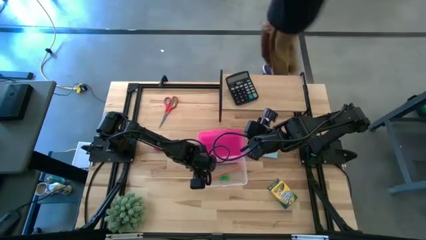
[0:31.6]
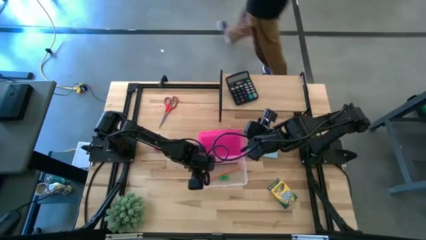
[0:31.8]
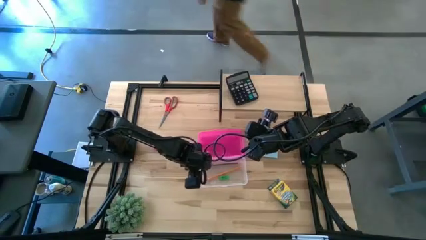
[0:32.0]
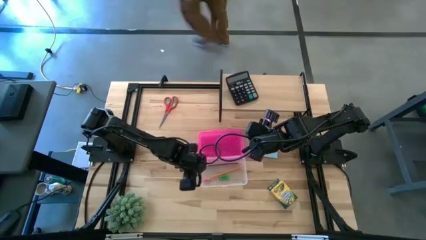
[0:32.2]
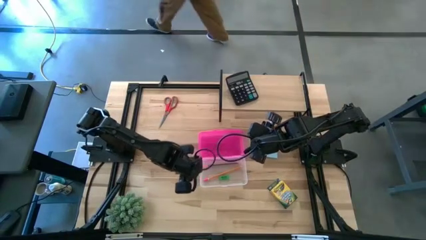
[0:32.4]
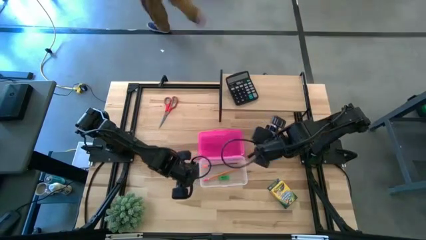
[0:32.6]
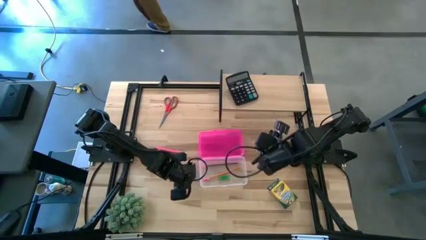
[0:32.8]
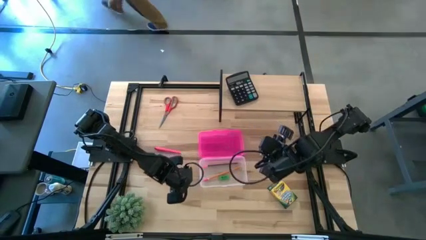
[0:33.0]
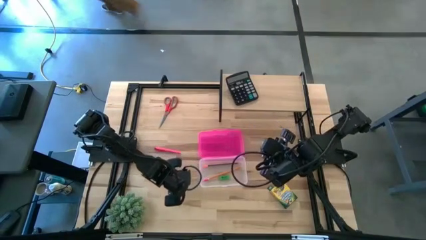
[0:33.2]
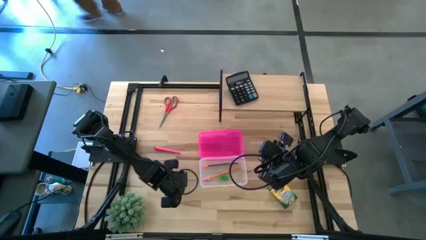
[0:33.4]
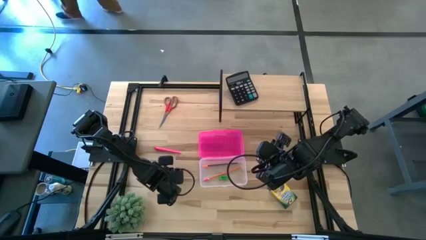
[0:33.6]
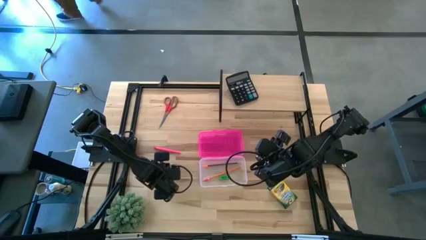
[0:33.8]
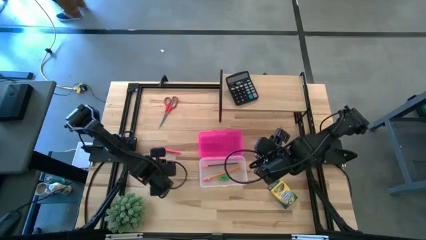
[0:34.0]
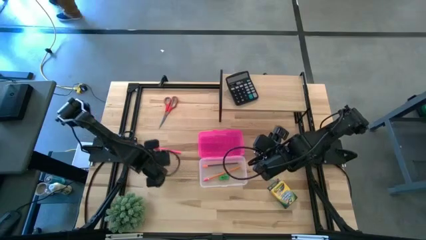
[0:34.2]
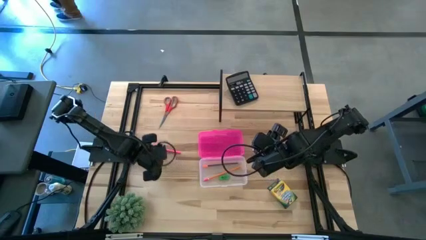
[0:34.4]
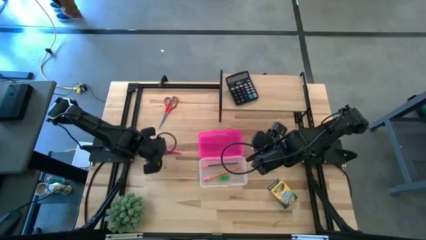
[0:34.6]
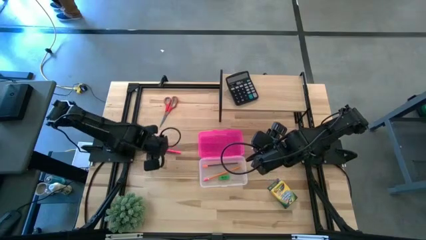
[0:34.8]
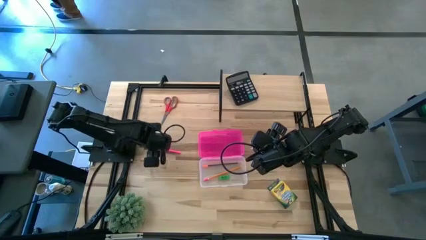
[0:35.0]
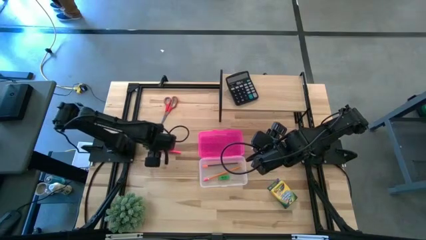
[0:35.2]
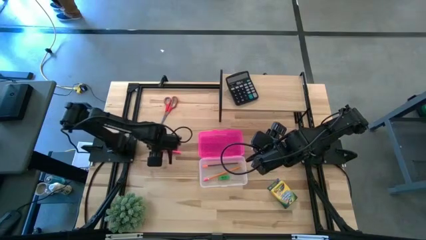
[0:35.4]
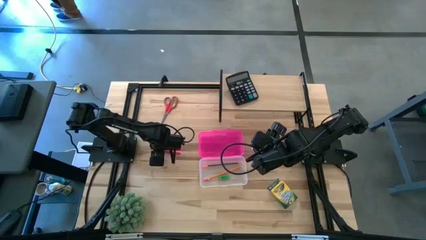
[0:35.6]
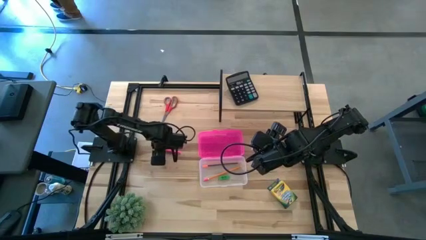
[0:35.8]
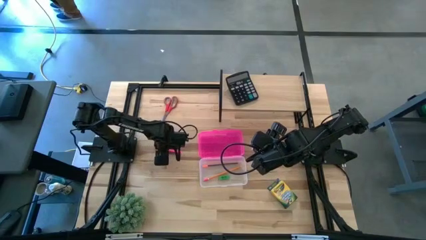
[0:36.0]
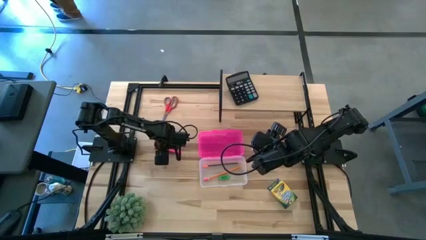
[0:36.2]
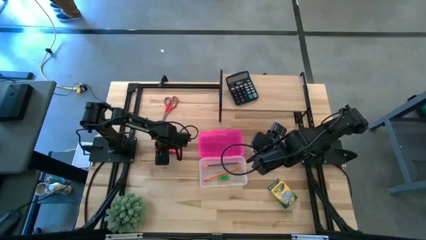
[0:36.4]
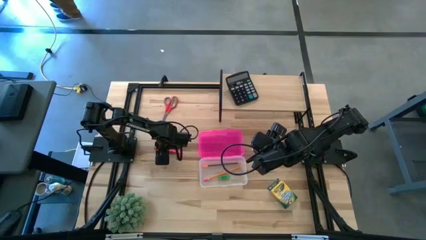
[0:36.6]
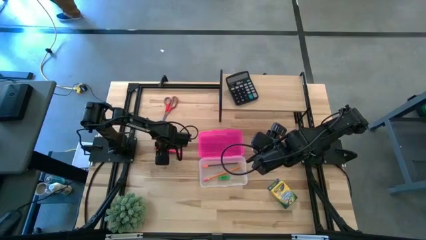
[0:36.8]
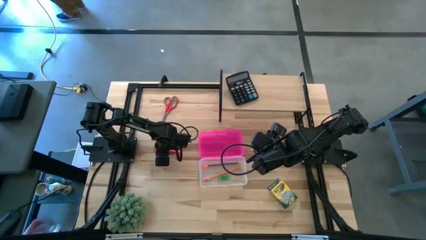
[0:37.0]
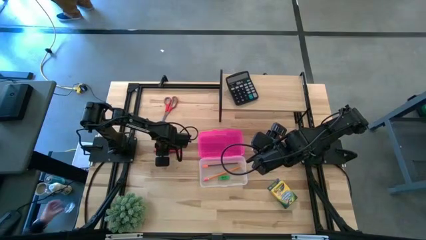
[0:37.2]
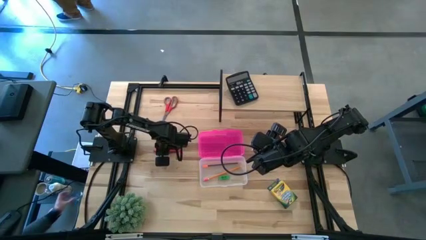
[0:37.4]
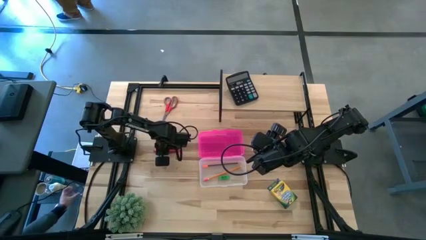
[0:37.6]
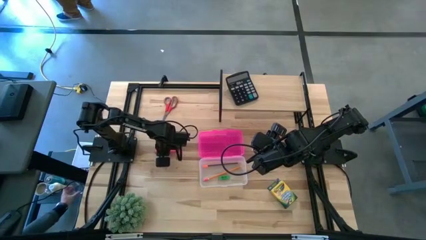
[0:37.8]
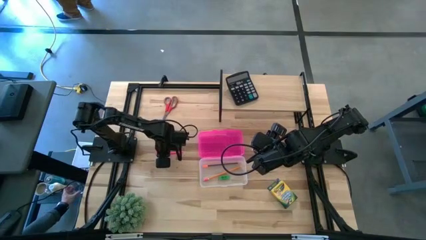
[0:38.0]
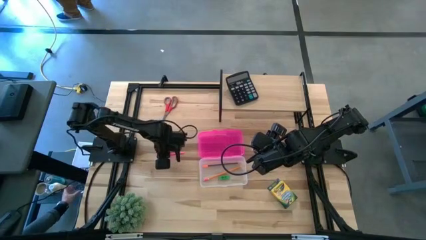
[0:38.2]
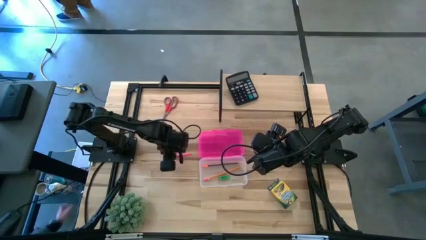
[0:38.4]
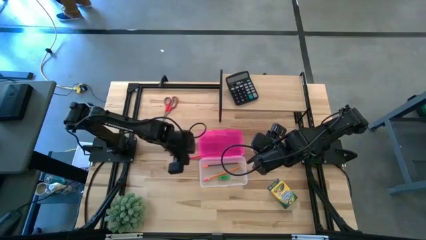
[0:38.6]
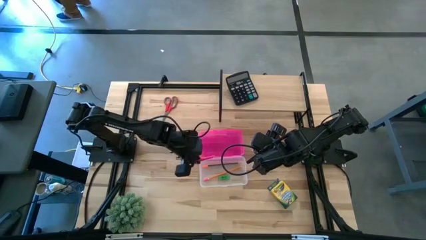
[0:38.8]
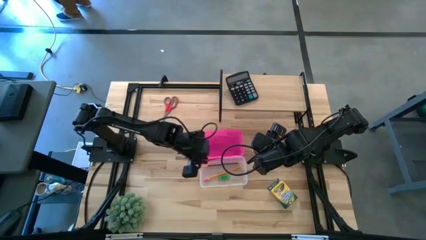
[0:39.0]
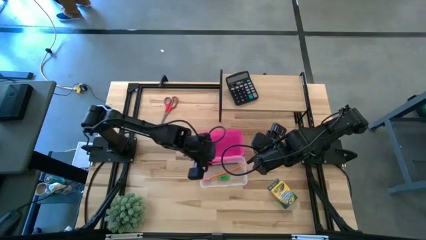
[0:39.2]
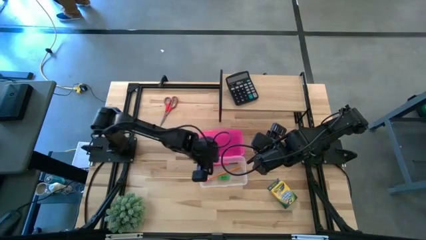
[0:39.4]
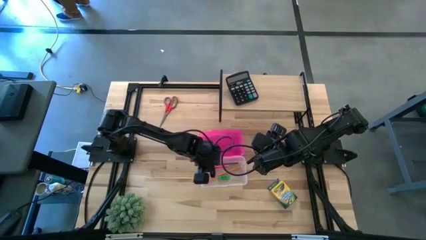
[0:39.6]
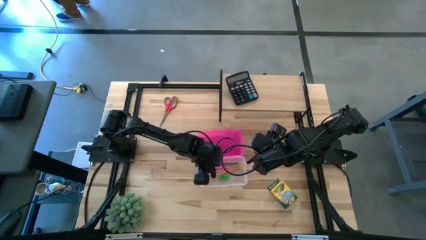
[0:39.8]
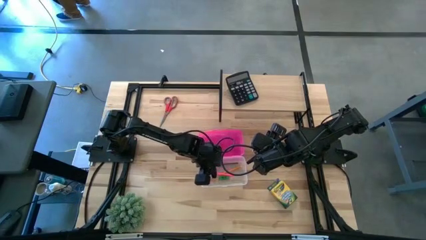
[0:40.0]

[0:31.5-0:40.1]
Task: Pack school essentials
Put the pink pen into the transparent box

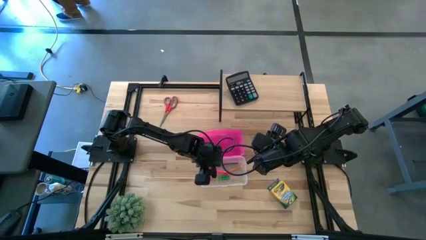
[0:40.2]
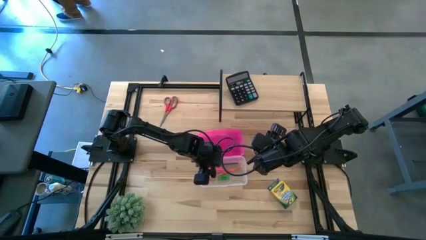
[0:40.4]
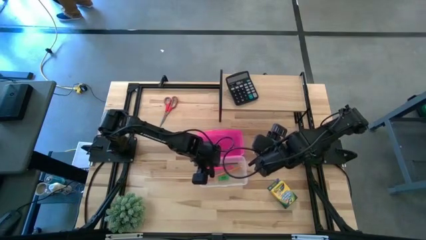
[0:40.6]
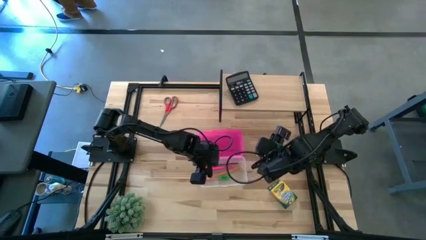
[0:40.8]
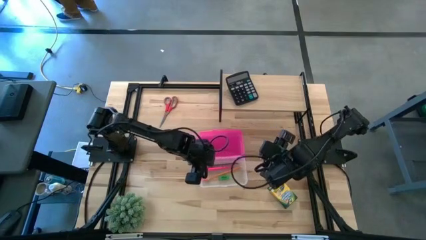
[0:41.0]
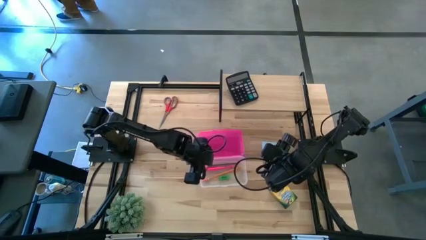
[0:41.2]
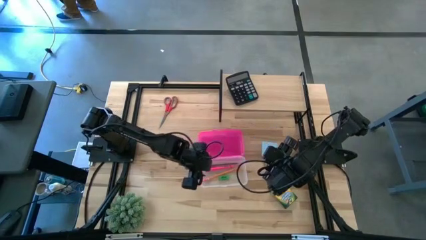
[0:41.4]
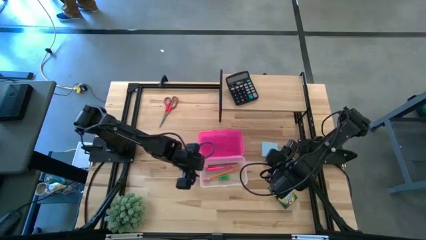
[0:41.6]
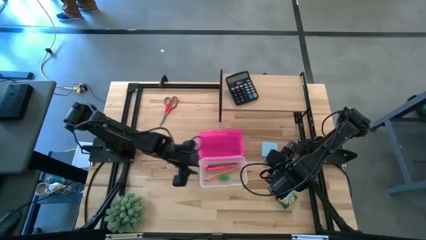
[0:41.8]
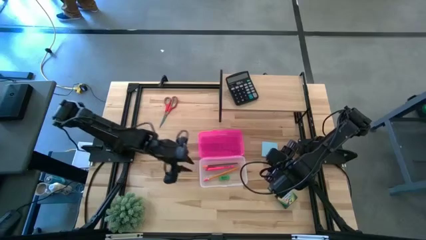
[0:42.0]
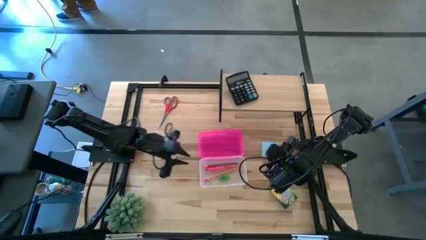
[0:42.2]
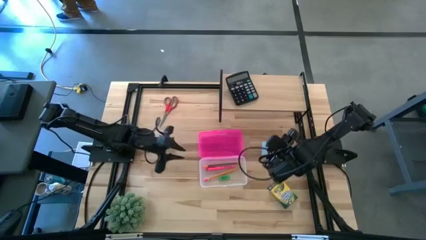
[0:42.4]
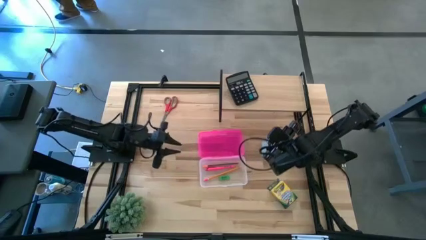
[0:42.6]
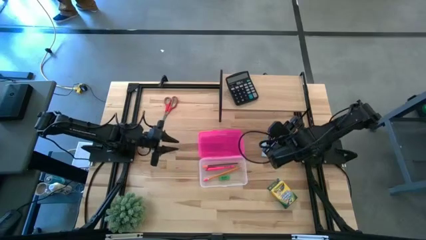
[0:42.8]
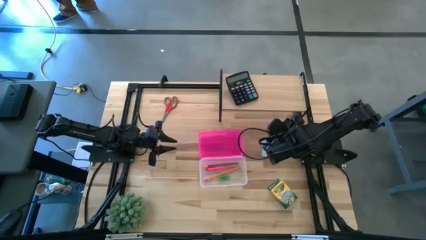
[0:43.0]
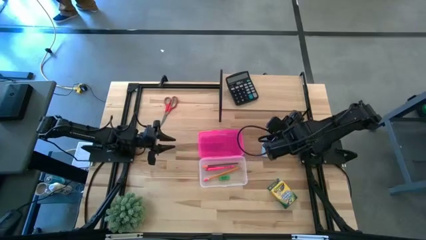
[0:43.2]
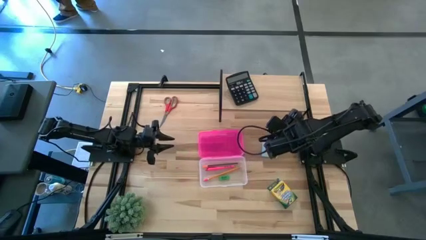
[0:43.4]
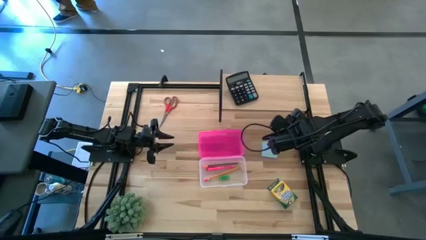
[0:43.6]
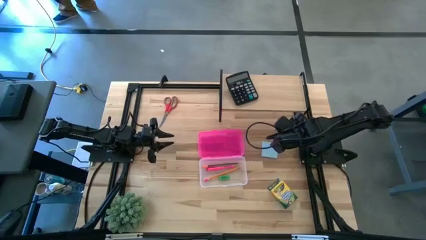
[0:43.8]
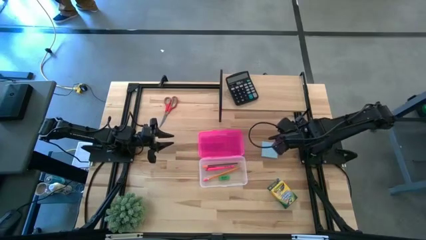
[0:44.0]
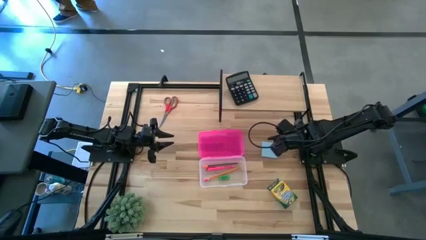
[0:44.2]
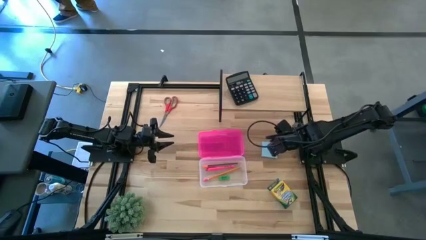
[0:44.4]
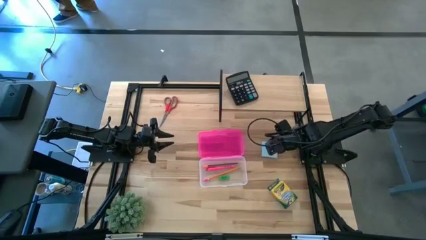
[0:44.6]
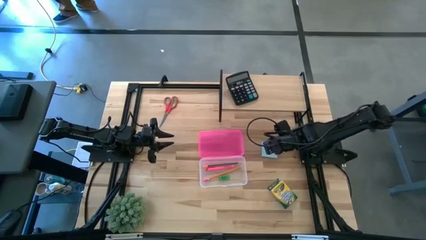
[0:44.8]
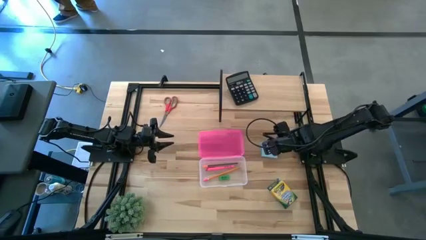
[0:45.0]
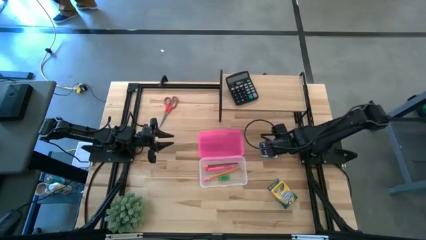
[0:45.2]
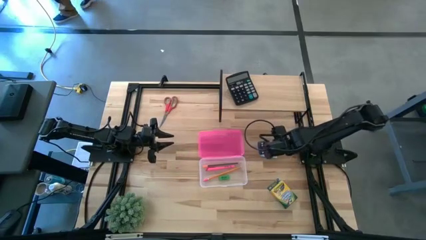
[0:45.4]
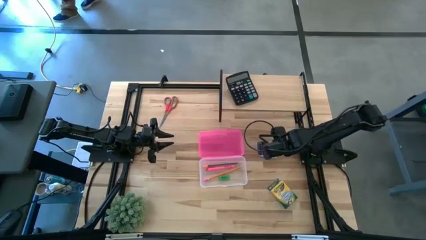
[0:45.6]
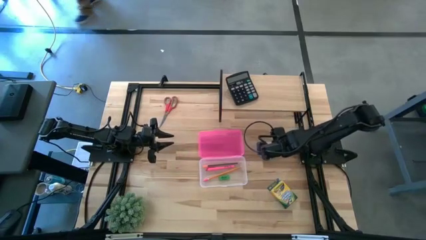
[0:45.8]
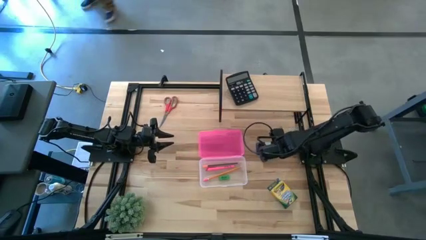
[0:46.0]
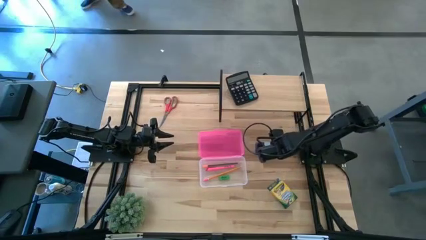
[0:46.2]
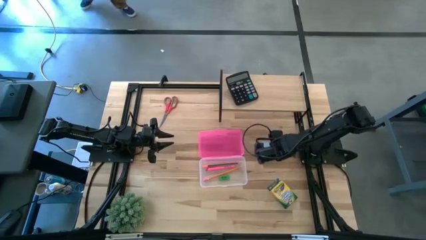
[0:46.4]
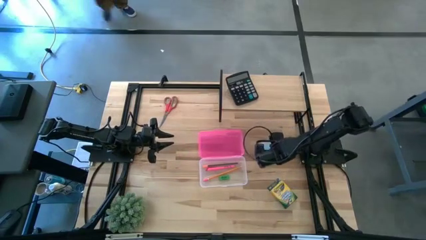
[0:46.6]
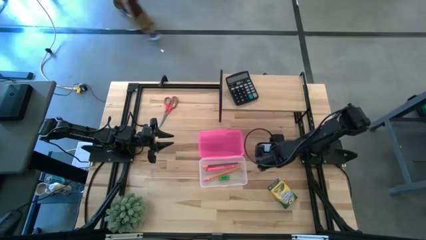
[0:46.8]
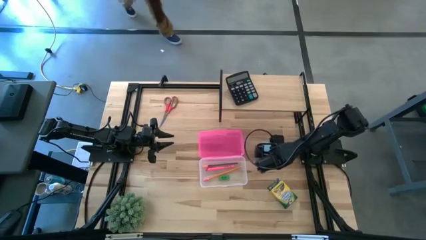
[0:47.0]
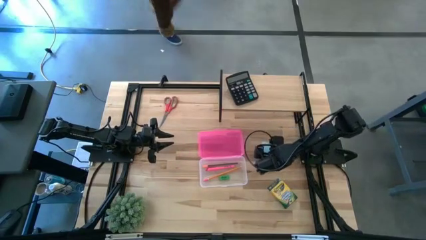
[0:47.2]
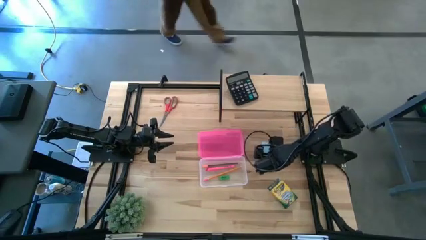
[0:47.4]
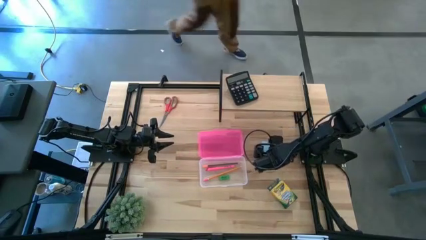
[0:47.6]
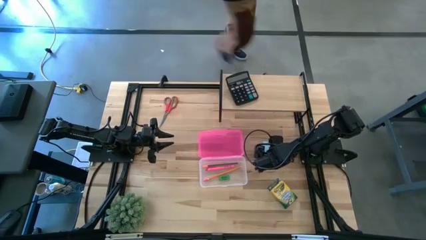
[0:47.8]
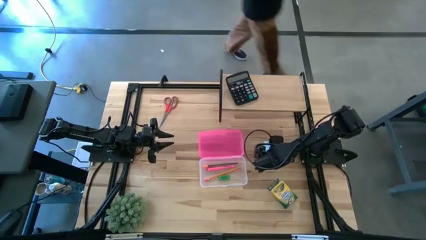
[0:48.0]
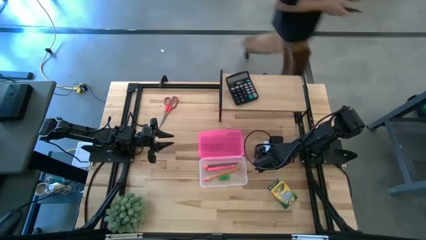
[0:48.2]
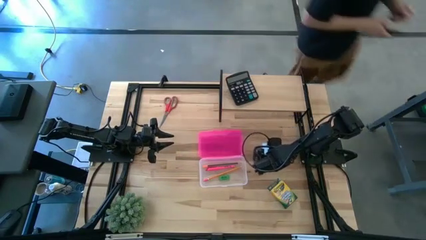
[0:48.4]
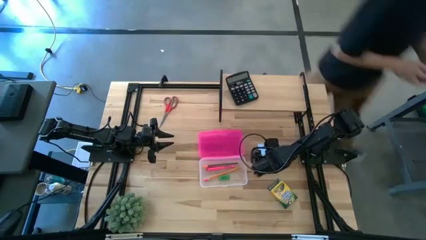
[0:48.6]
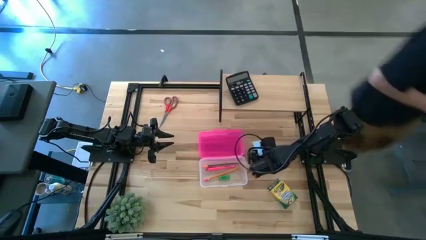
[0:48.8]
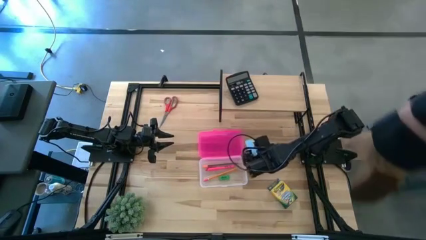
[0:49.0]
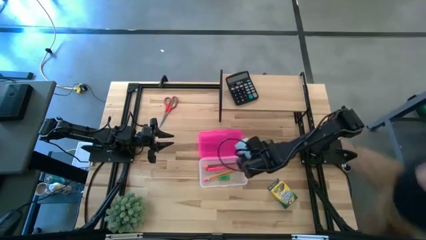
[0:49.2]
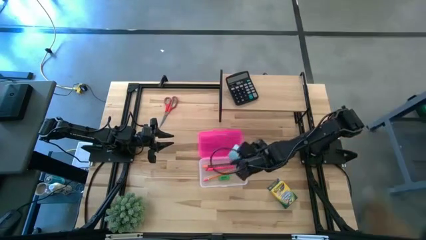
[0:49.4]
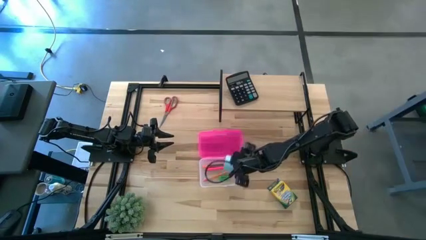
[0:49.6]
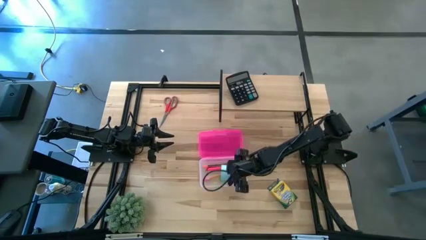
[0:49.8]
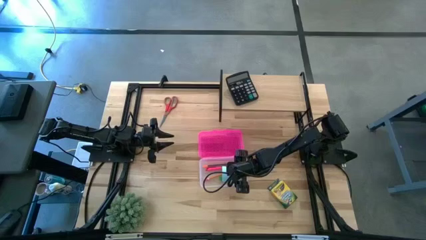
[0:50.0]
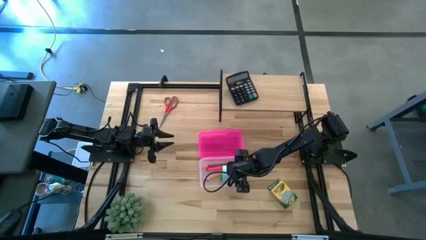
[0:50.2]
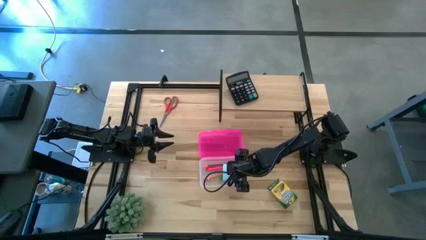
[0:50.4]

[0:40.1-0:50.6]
Put the blue sticky note into the transparent box
